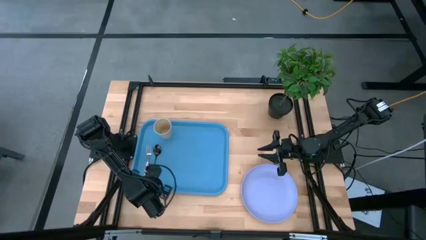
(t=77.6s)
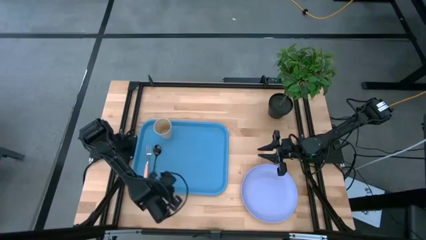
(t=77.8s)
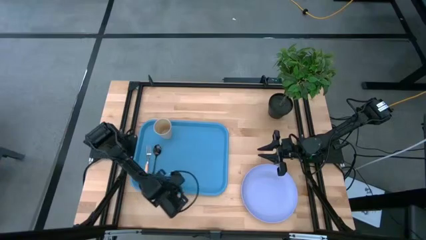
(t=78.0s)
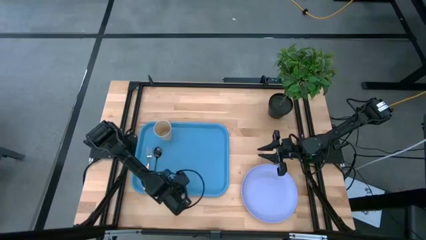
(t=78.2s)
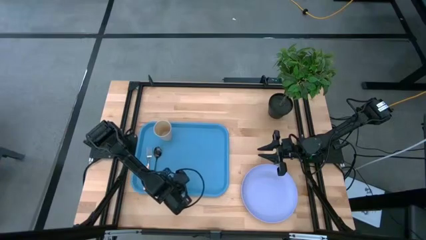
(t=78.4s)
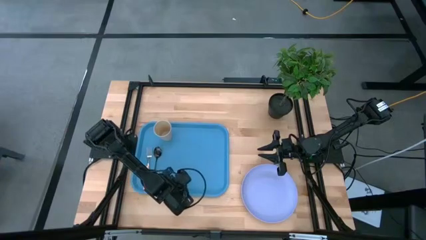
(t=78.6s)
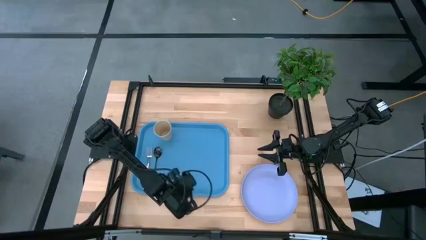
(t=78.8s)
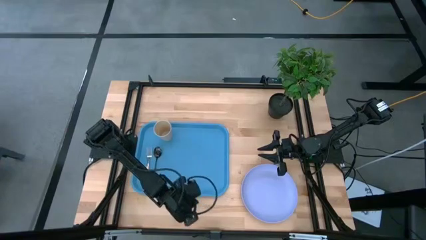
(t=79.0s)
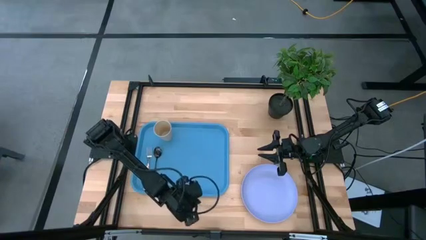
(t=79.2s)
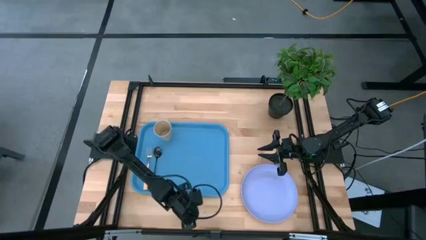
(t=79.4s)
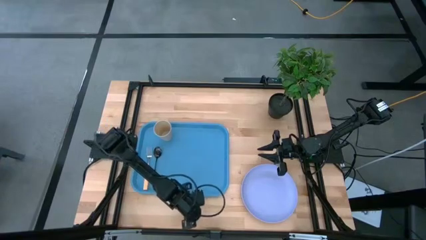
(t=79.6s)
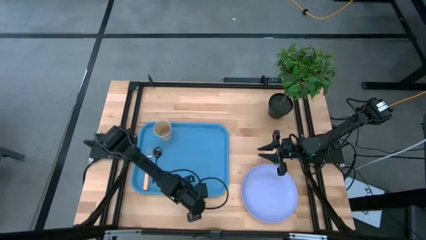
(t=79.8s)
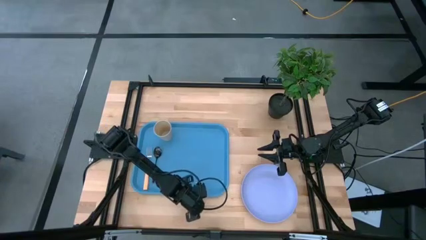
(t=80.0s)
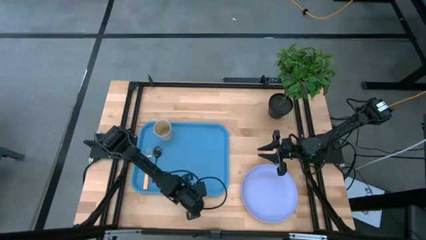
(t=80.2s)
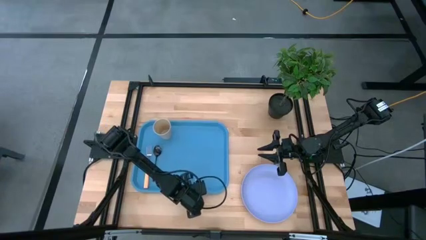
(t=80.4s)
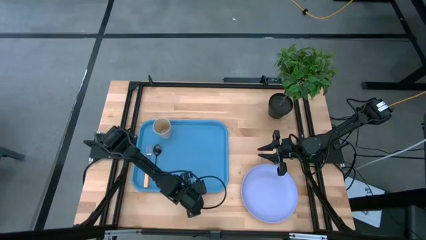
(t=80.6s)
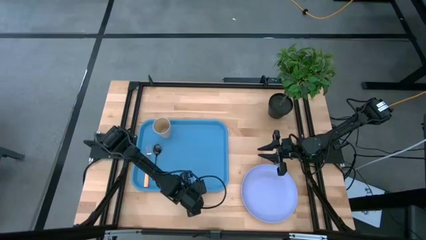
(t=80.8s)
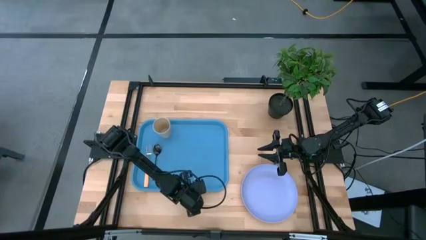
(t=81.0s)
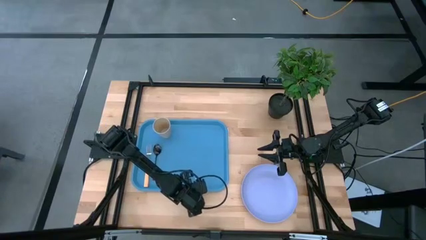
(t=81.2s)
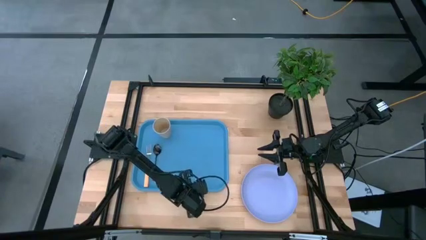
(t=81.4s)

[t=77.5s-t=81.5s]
Task: Pick and place plate/cup/fork/spoon on tray
Adjust the blue tray

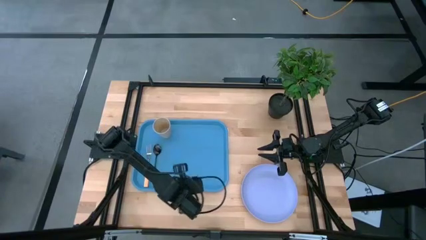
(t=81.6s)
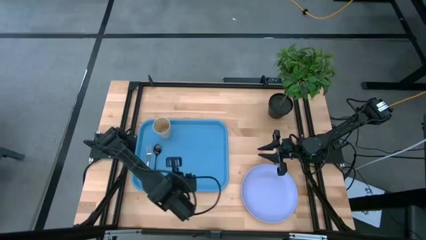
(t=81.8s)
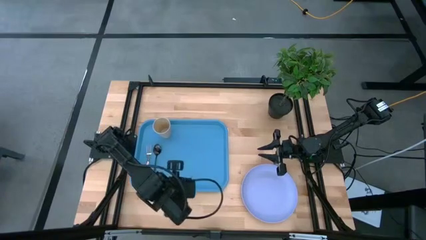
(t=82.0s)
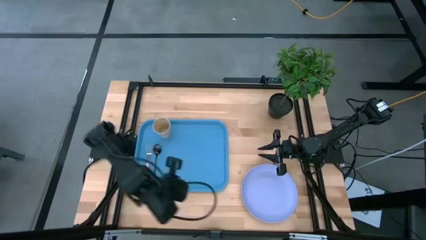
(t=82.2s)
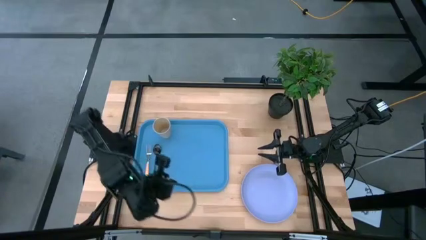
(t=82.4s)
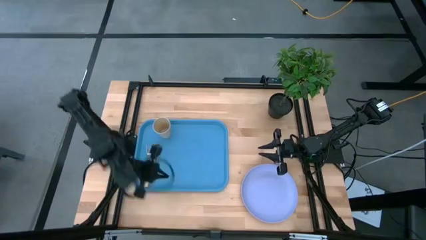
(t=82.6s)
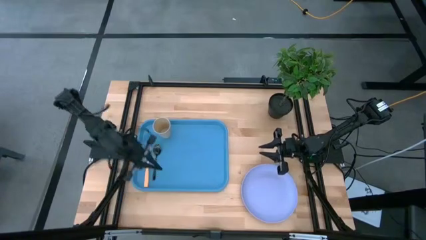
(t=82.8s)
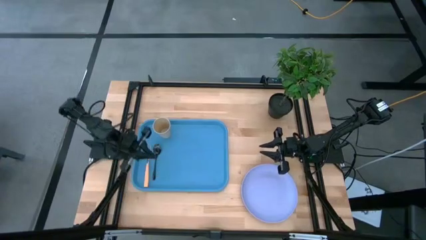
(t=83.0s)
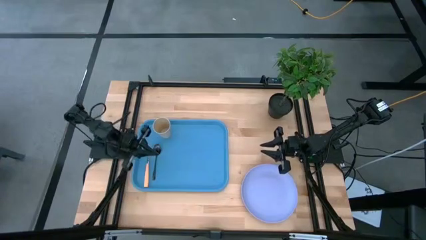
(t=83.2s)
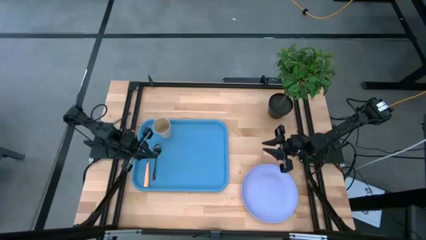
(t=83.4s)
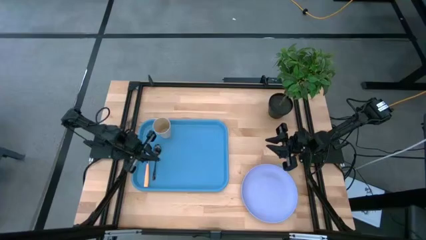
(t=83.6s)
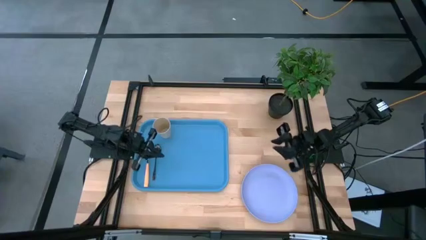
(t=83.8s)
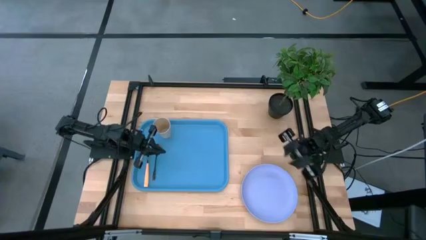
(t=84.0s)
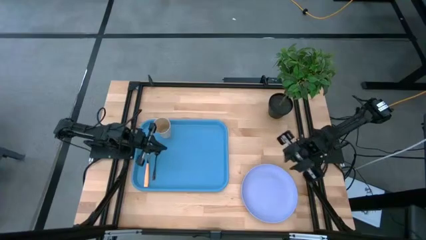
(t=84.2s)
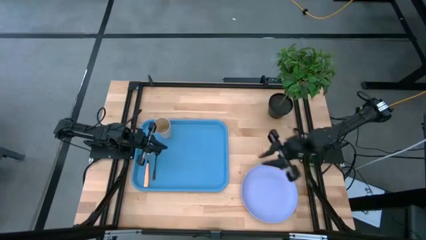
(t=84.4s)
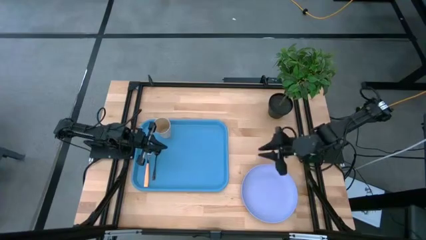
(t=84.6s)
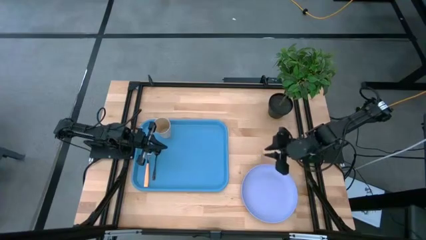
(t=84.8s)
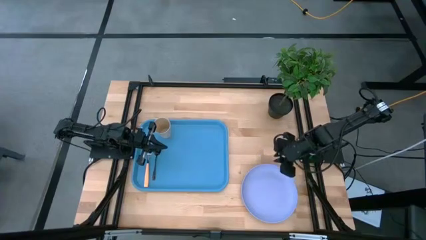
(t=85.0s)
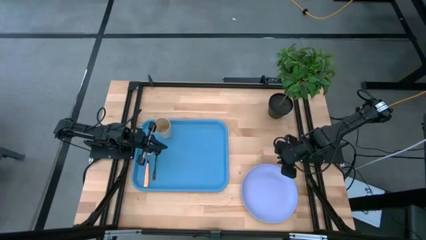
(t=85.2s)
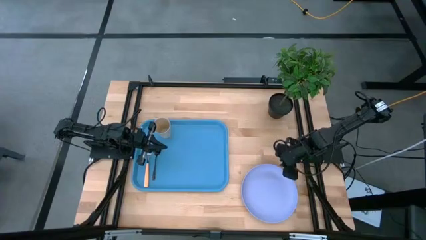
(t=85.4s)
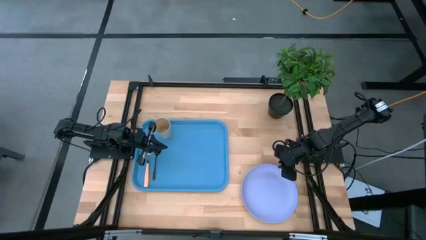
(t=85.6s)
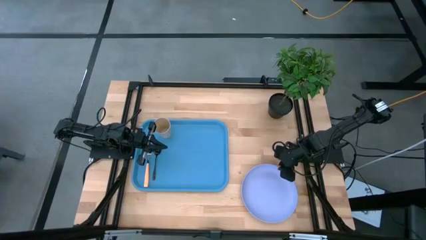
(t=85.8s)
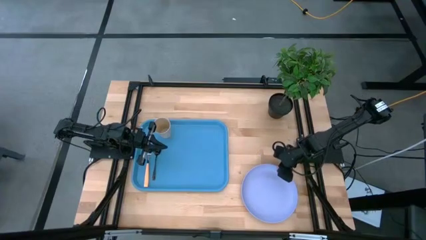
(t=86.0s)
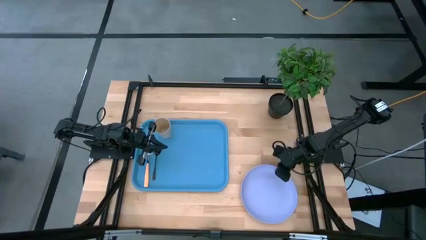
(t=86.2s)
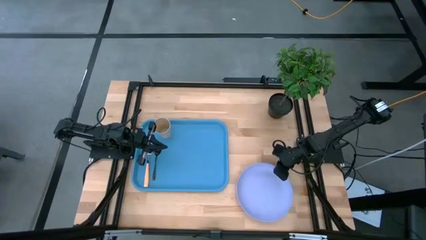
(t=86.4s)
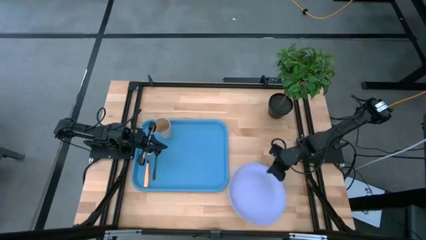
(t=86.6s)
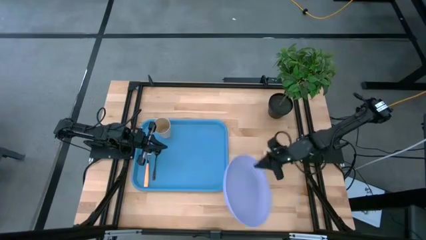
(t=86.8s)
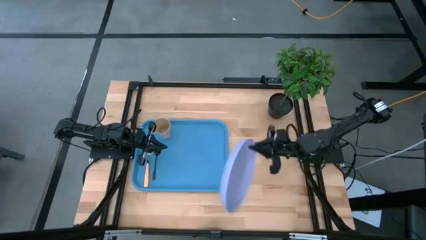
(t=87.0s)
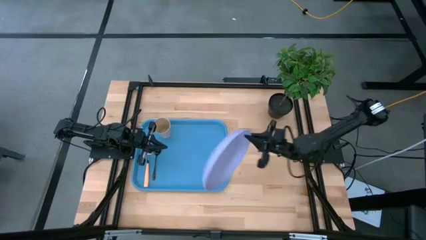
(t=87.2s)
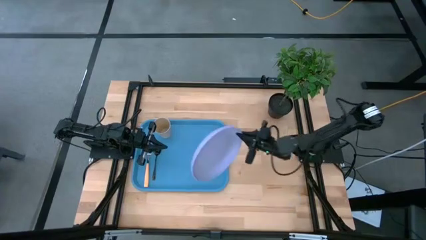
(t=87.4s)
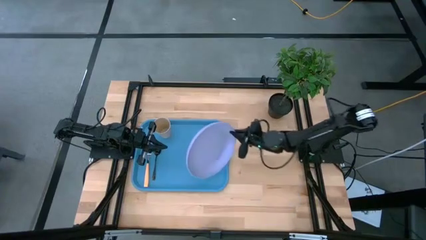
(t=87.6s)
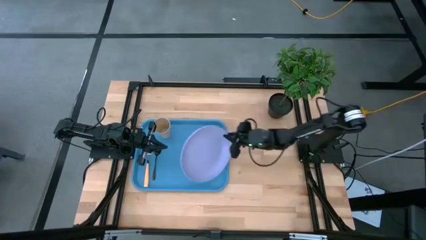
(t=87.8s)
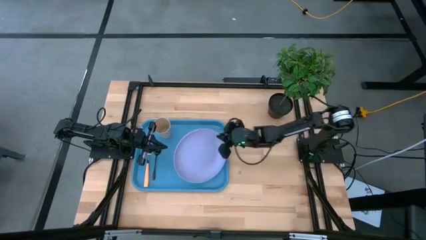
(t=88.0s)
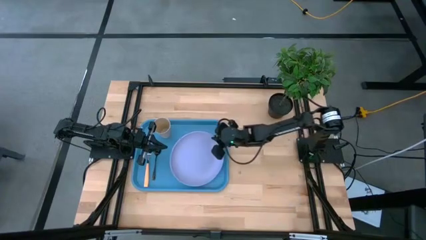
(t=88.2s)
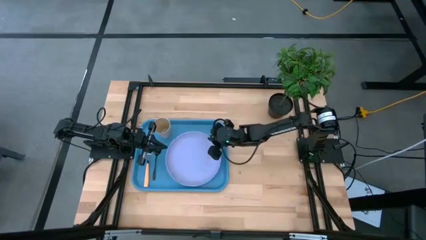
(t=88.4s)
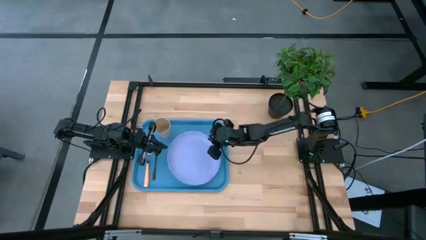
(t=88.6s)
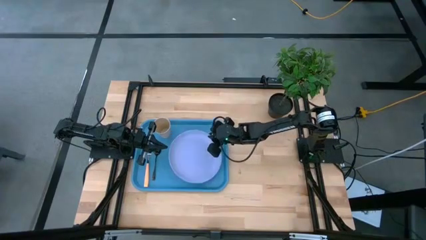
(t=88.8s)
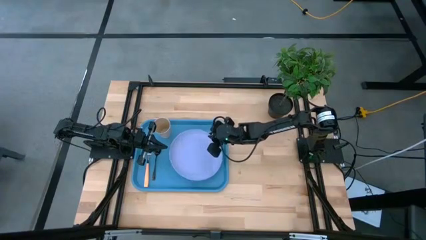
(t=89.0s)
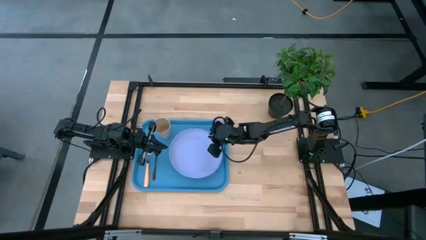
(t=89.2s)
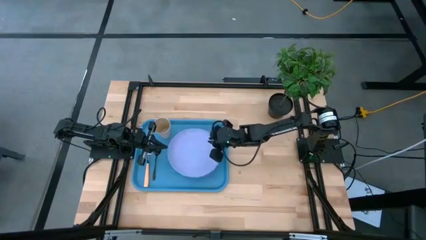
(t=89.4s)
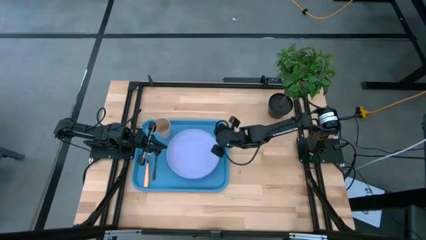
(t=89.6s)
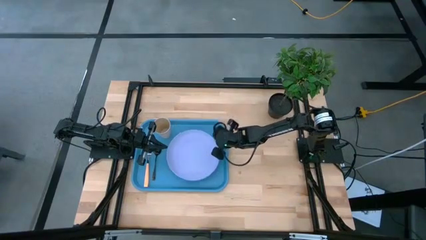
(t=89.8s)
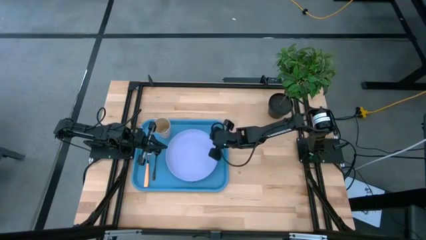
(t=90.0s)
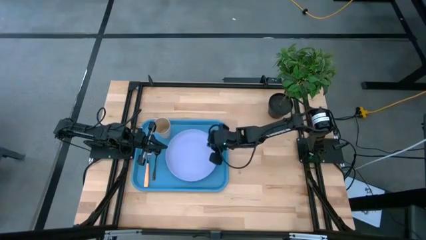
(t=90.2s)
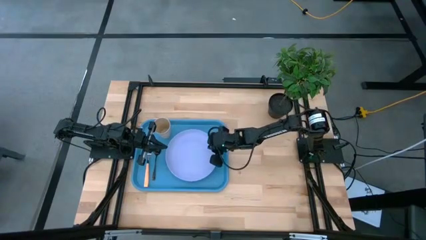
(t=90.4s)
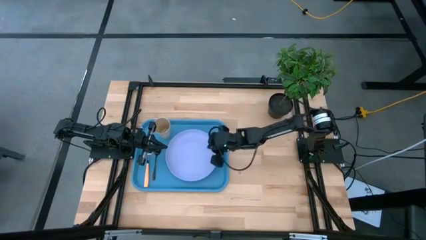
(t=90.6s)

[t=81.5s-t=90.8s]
Put the light purple plate on the blue tray

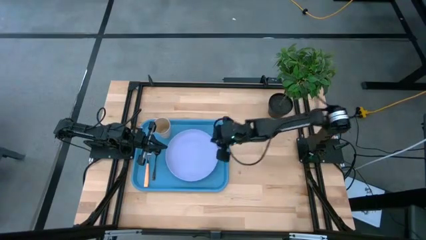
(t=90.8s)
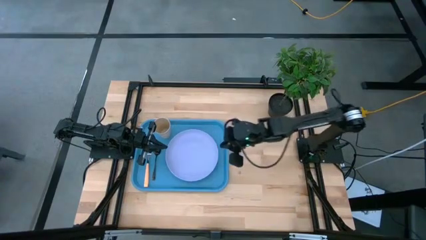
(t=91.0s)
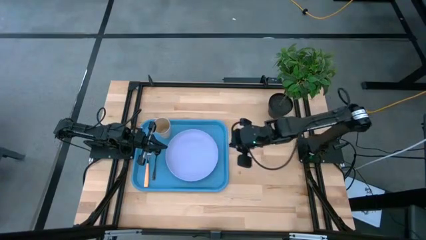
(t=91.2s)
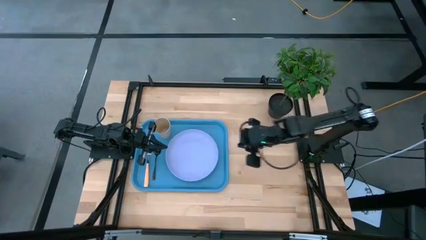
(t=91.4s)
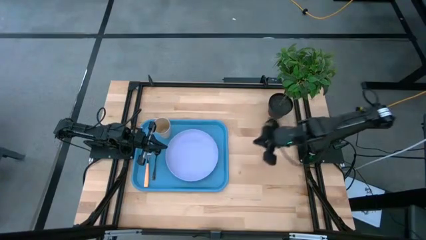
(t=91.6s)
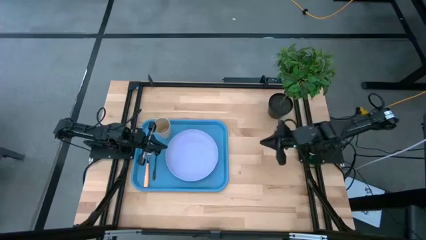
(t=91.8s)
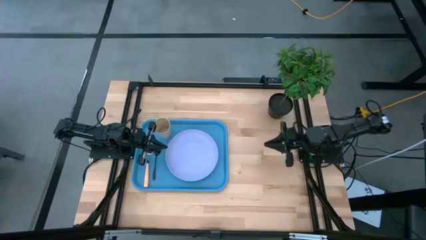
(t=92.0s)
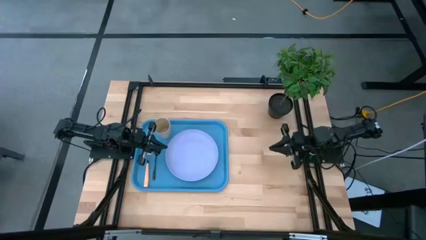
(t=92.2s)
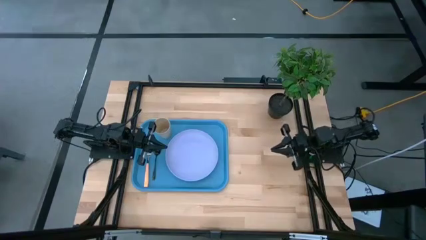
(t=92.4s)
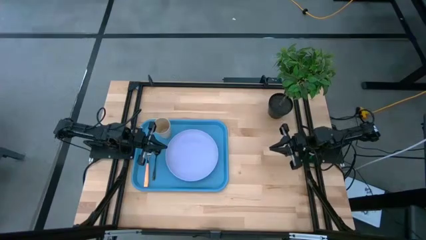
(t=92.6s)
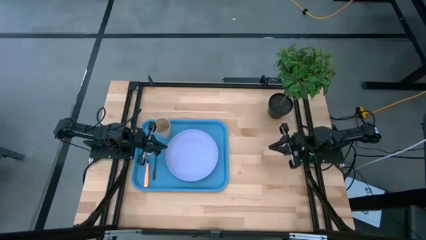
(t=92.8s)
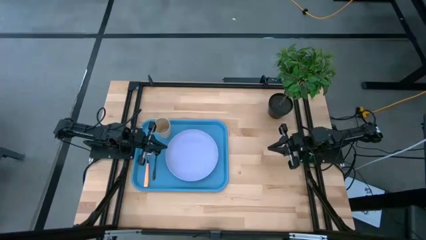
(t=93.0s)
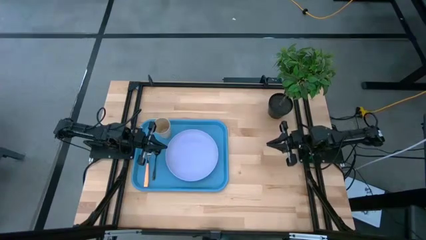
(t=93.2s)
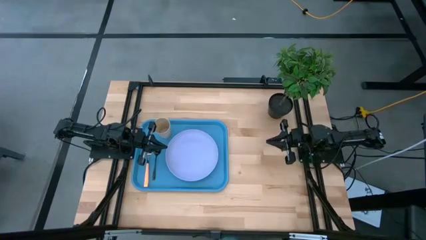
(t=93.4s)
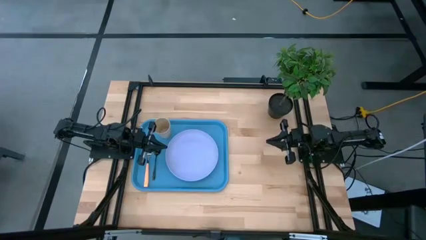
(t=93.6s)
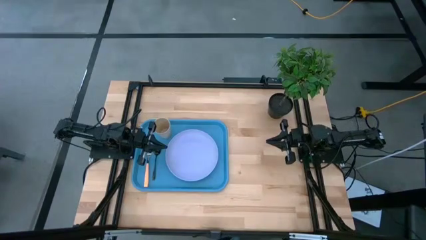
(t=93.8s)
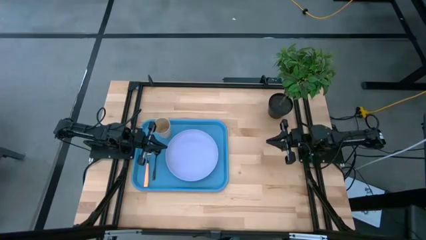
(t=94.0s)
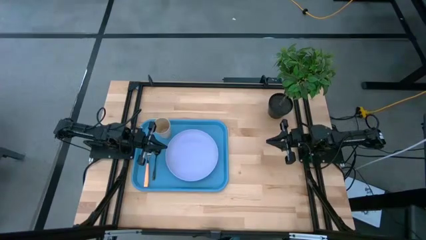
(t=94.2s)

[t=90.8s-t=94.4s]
Return to Home Position

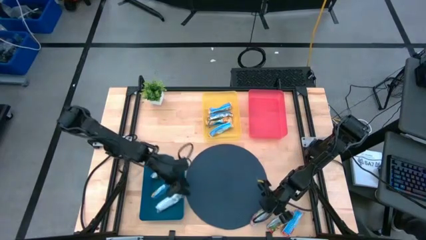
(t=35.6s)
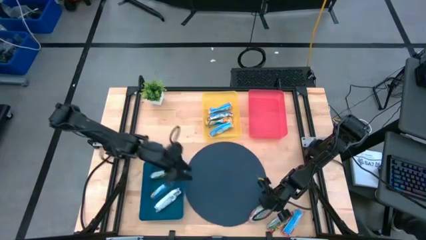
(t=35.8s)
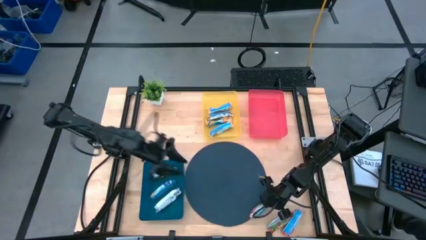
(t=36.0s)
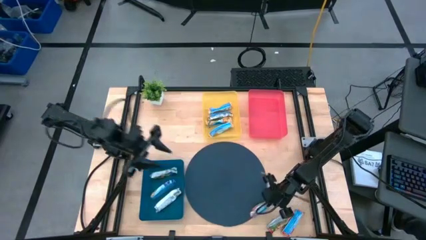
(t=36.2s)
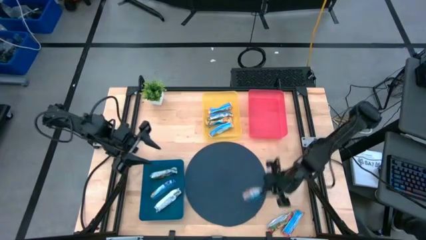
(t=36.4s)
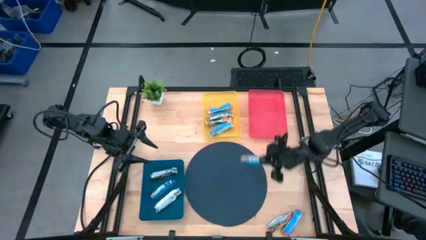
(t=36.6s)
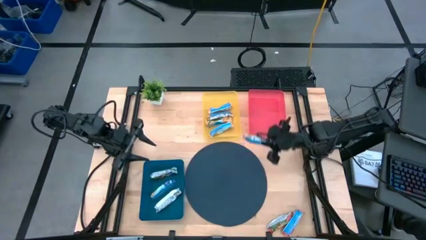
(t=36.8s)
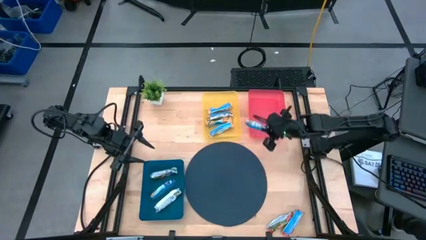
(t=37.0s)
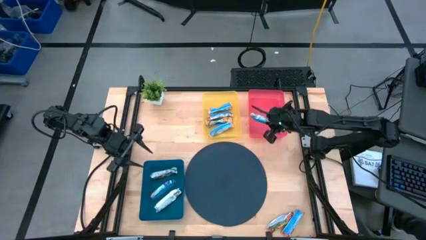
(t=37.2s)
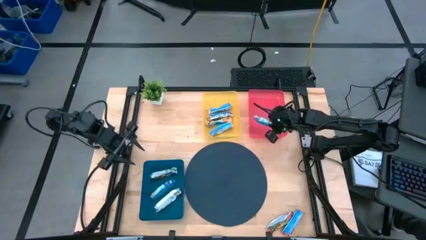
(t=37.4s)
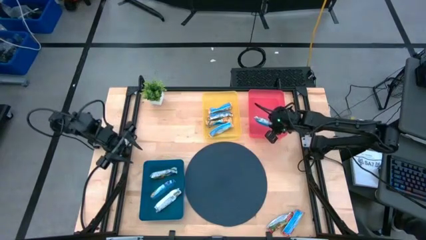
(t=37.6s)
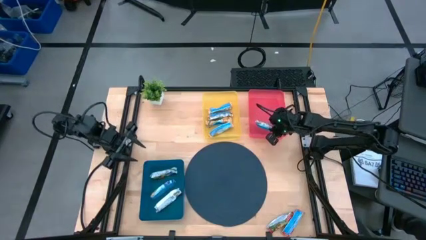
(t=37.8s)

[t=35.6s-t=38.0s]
Task: Pick and place Granola Bars by type
Put the red granola bar into the red bin
